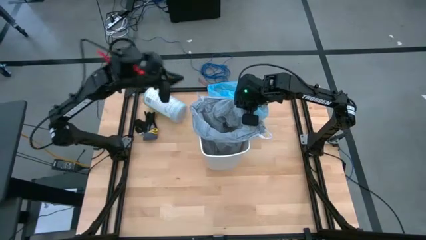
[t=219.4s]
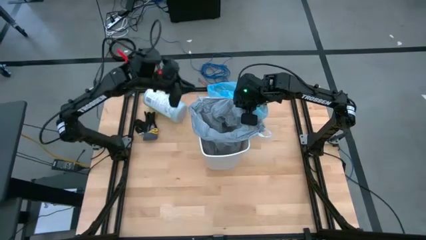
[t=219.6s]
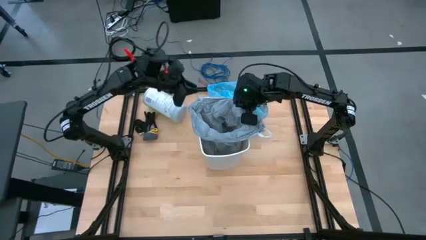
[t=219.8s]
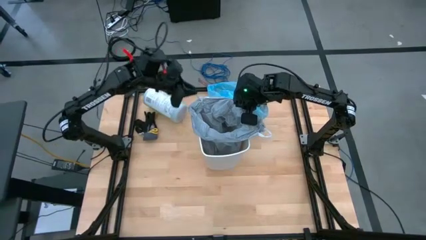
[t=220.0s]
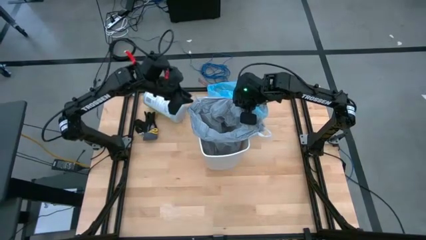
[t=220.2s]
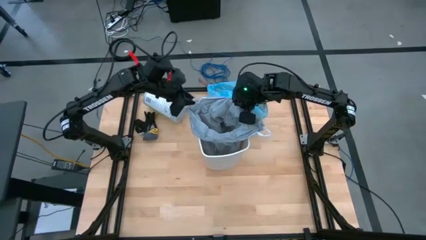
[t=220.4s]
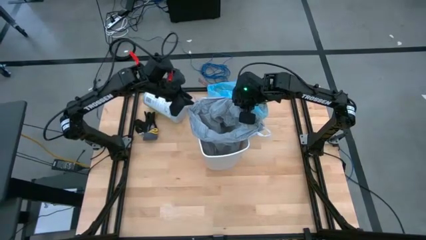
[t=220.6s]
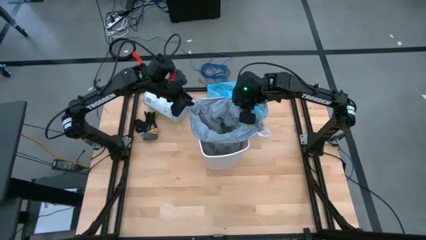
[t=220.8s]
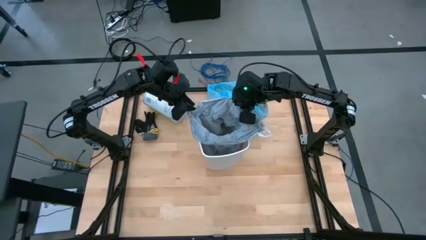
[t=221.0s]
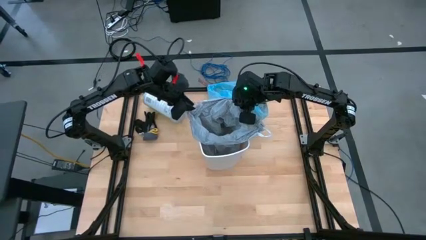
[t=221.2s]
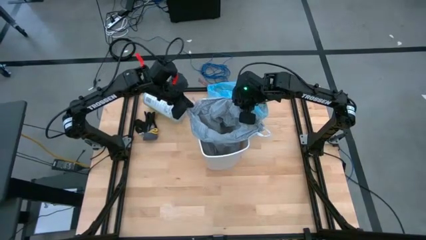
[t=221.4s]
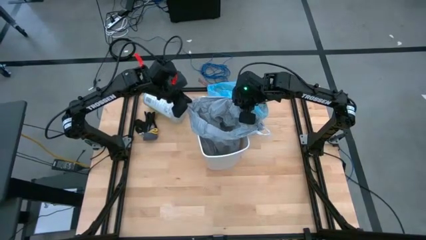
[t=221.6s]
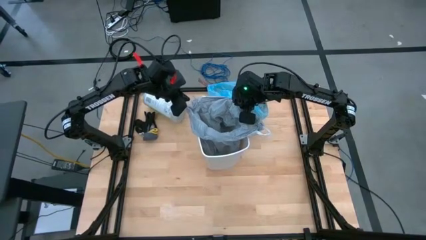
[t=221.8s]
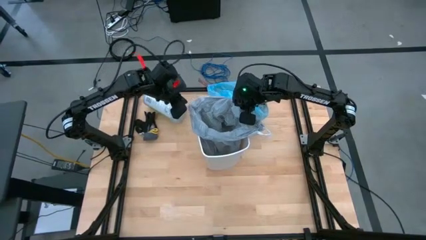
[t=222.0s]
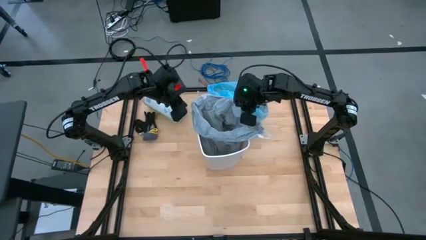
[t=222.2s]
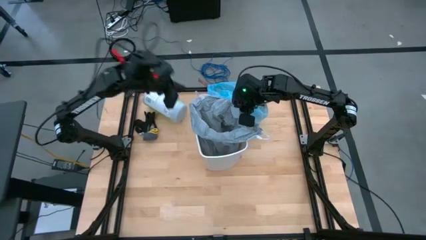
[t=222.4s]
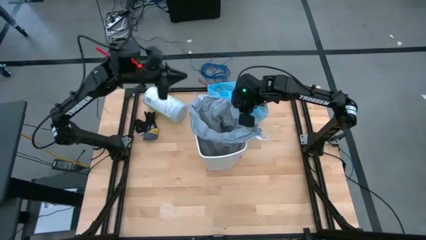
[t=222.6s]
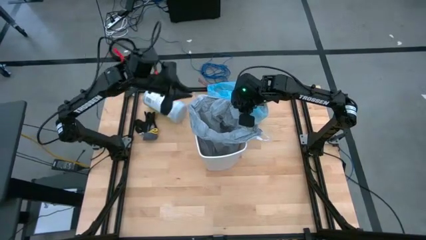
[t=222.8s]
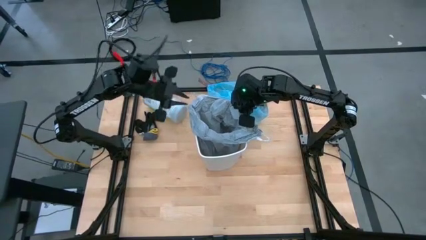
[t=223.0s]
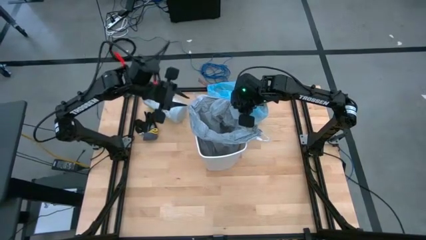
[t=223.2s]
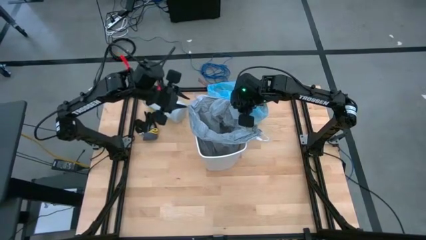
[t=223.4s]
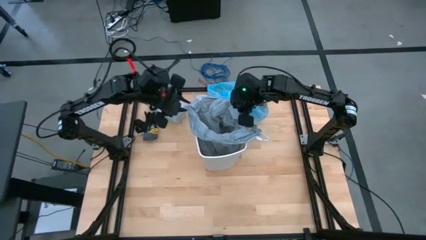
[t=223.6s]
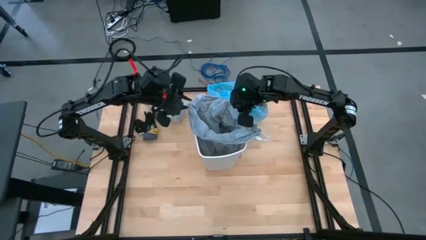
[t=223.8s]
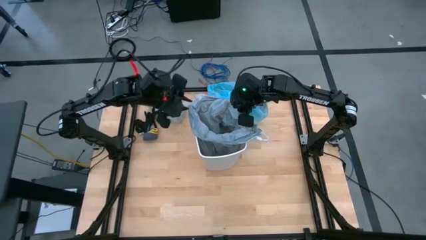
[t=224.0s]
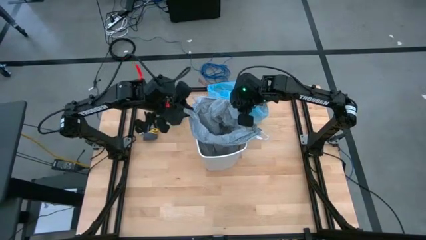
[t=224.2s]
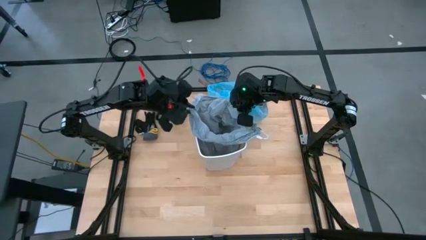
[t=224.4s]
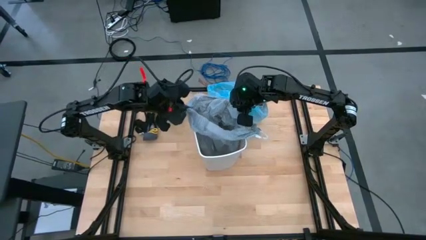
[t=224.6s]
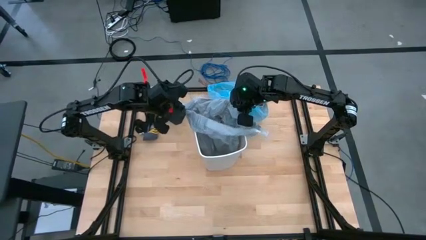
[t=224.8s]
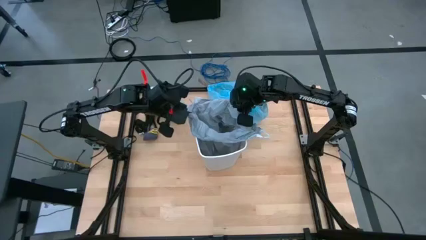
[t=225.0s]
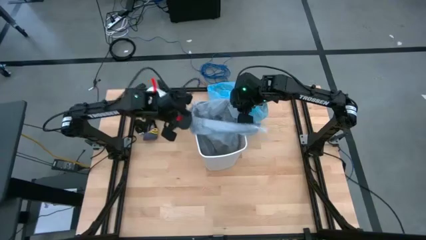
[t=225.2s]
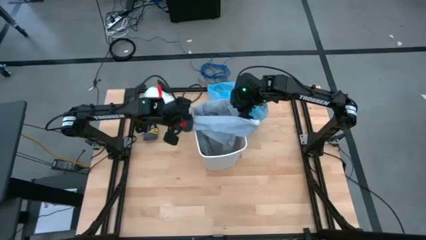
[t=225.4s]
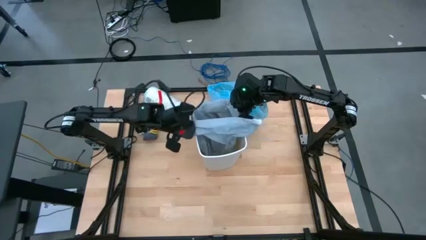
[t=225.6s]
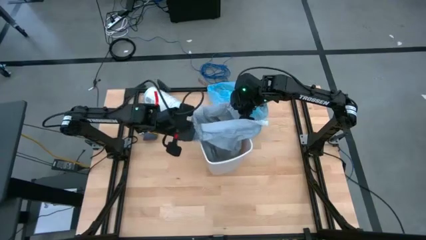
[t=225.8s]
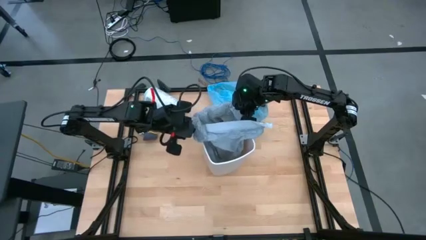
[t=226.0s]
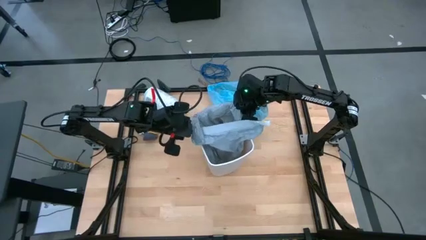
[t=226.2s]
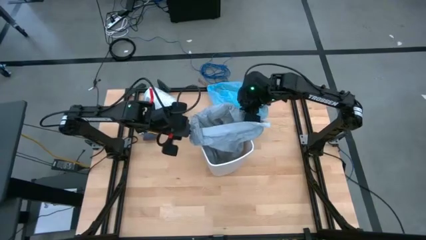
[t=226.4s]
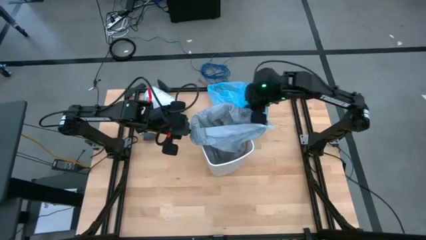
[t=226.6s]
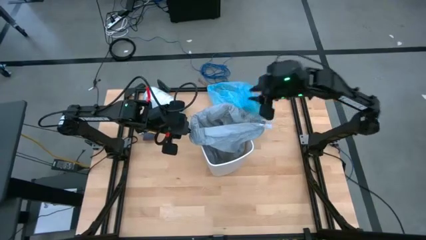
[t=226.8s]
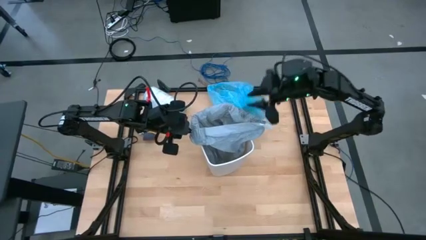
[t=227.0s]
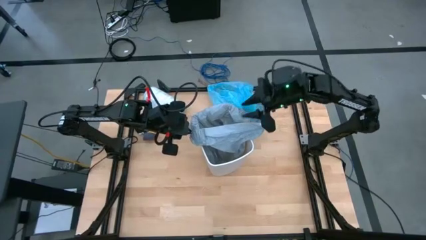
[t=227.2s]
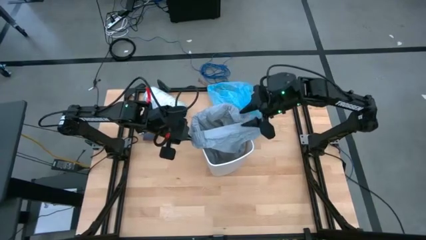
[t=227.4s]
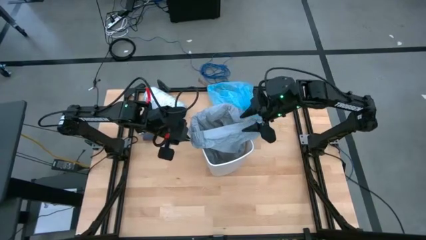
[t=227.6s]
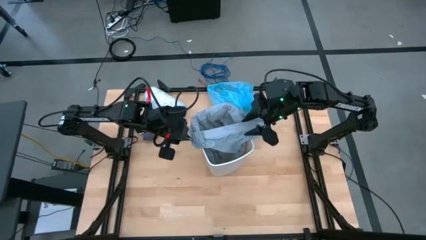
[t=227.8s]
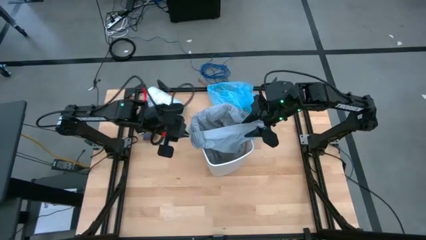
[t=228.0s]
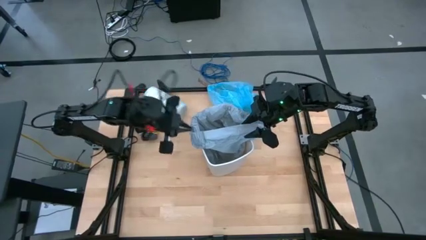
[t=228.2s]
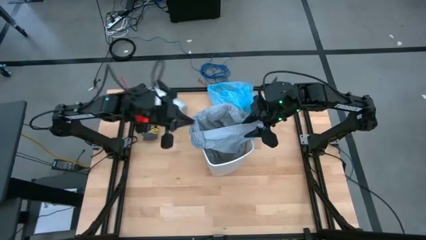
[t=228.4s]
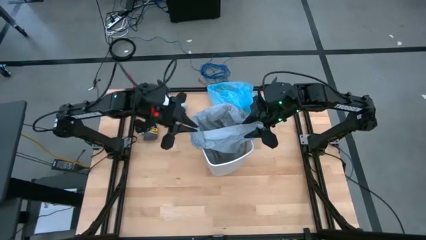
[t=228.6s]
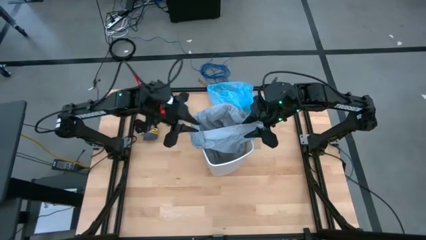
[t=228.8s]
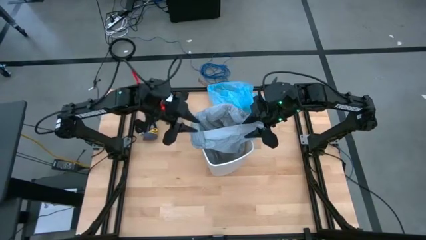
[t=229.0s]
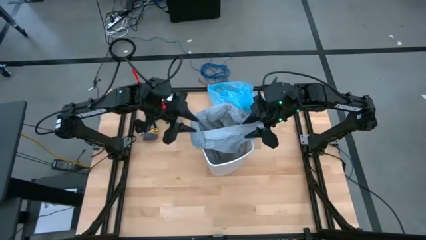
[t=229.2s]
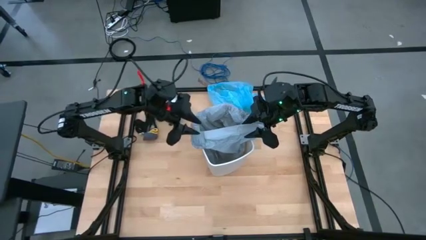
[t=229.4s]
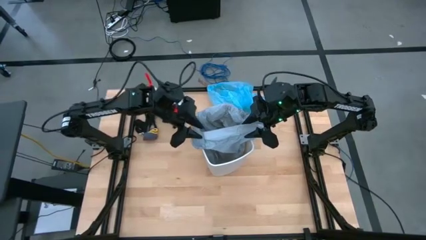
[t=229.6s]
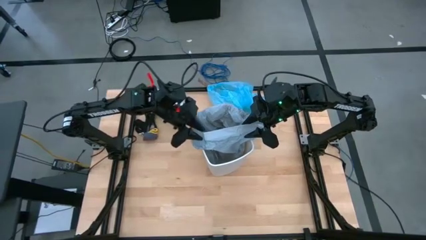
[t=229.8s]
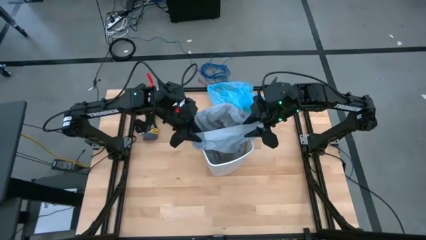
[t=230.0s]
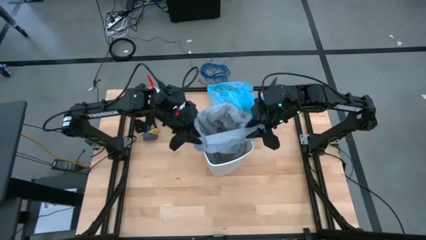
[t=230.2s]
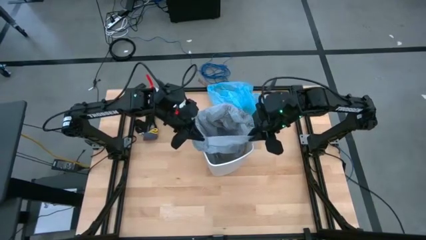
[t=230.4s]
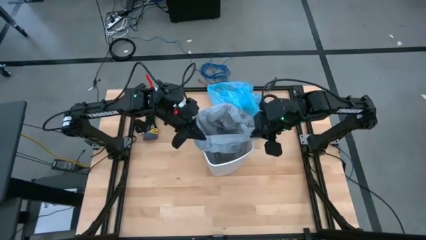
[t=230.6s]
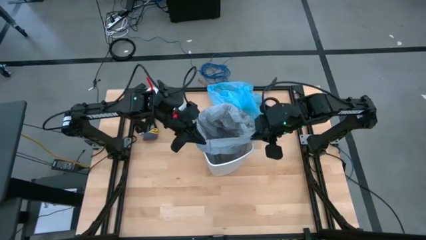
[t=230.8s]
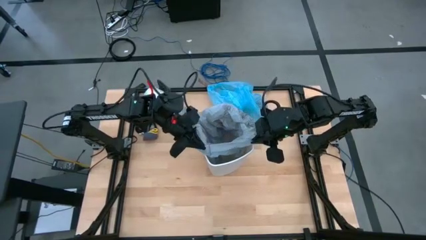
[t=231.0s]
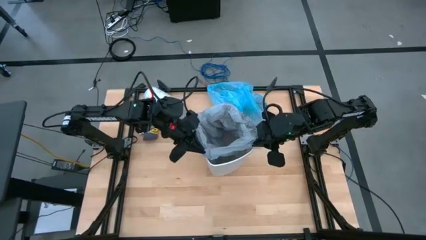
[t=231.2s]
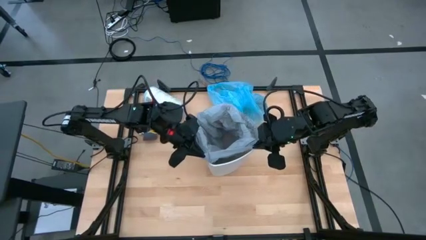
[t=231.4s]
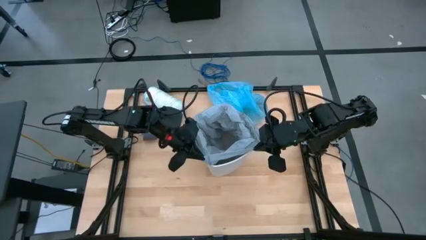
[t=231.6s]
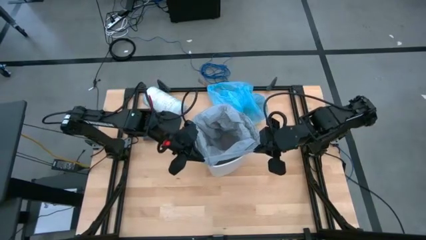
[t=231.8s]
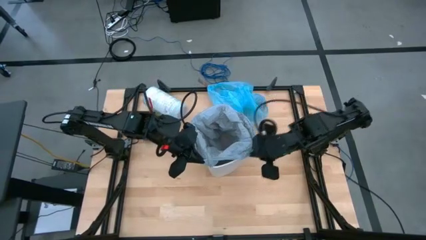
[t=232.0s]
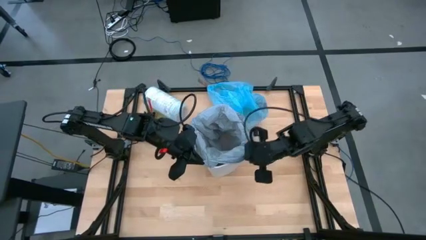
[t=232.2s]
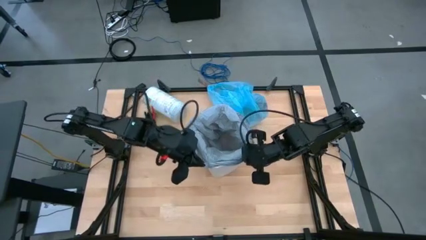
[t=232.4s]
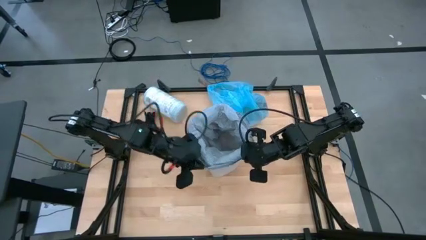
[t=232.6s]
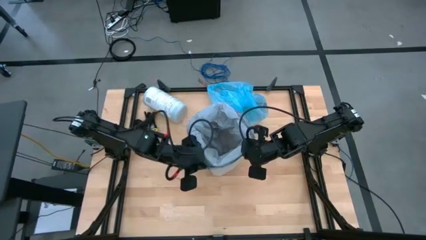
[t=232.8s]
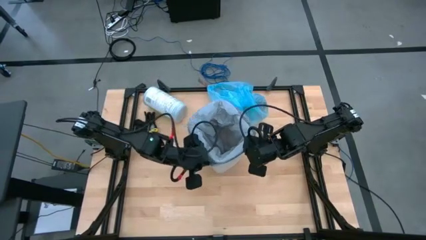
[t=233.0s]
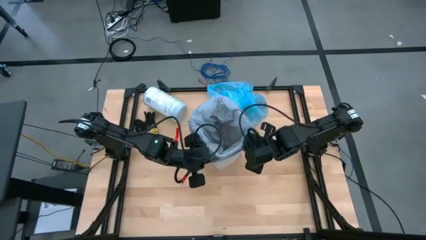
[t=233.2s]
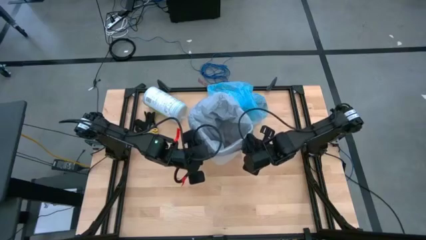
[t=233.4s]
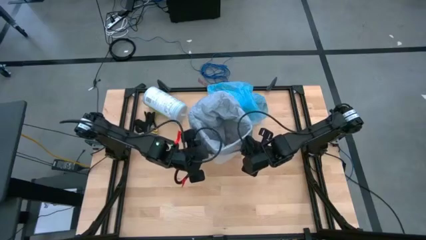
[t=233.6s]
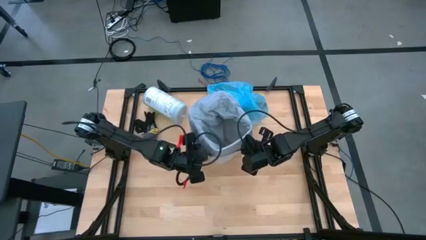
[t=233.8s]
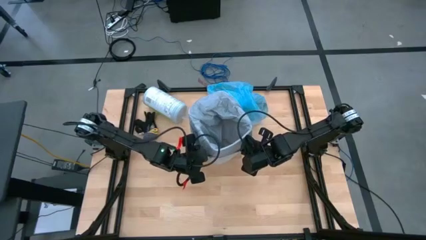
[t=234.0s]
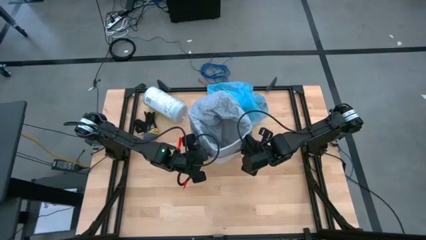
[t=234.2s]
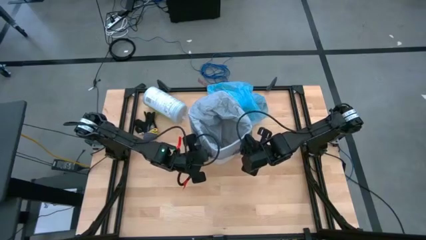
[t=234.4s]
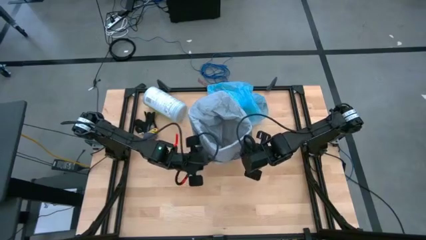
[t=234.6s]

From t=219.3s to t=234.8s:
Task: place trash/remove bag and relplace
Put the gray trash bag into the trash bin

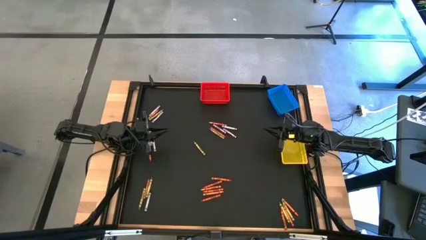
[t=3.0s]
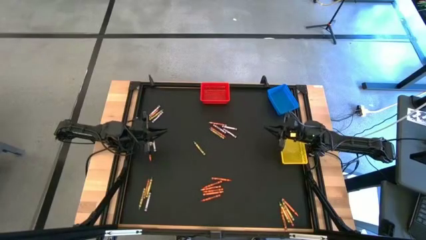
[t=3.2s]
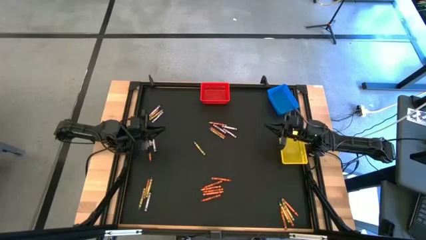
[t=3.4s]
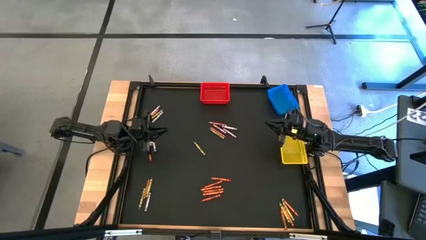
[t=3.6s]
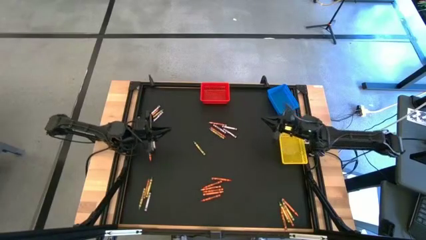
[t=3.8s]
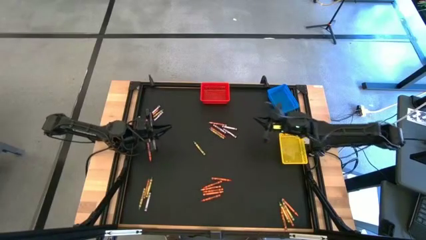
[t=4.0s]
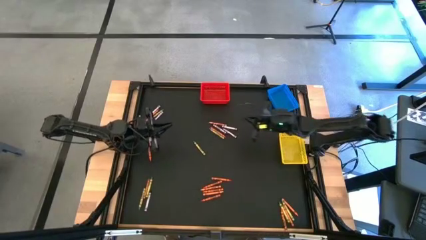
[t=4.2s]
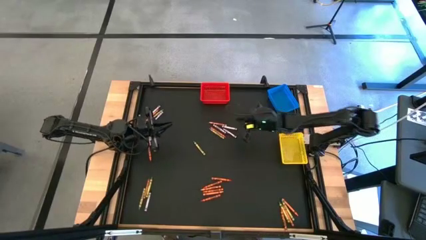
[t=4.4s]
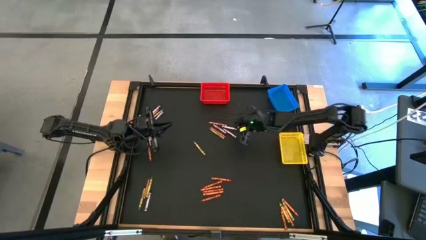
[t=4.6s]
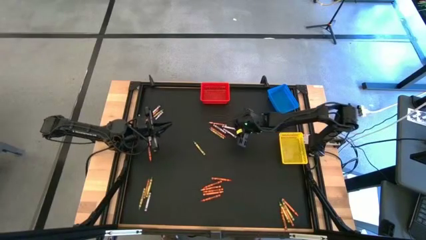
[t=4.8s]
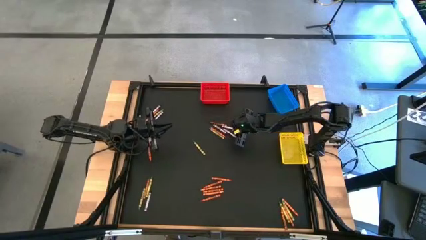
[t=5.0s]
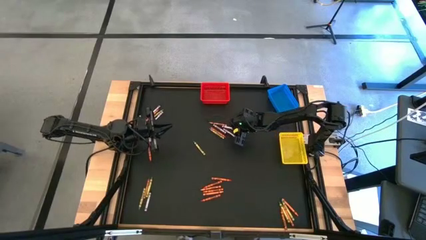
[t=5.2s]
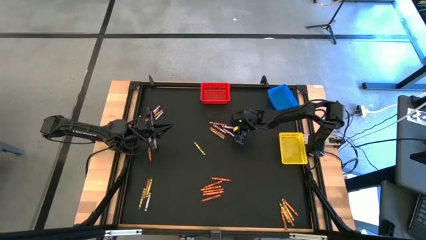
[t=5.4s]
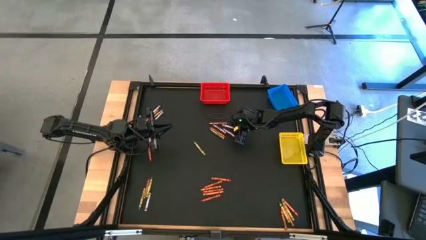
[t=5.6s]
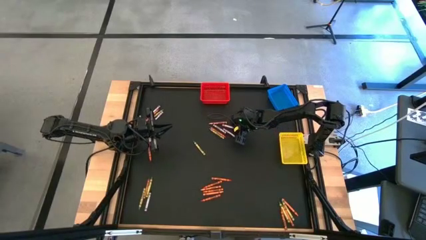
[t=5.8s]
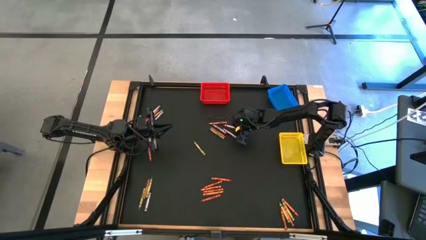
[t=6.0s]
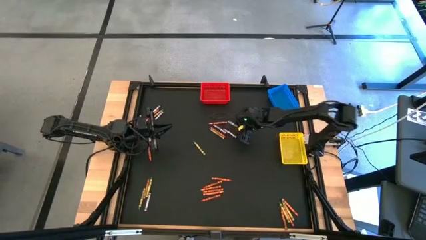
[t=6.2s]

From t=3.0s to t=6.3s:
Task: Sort crayons
Put the black crayon into the blue bin
